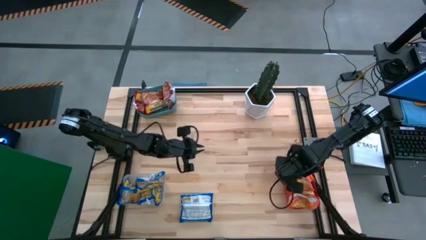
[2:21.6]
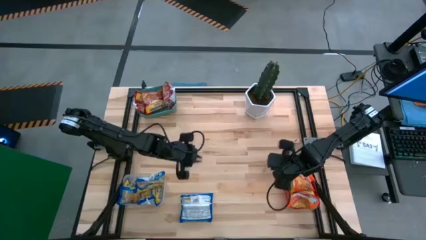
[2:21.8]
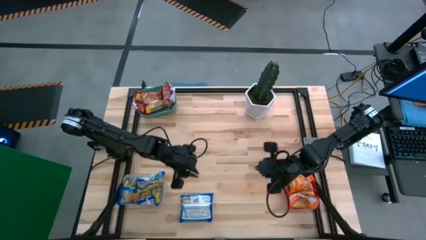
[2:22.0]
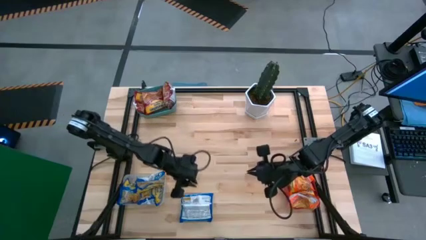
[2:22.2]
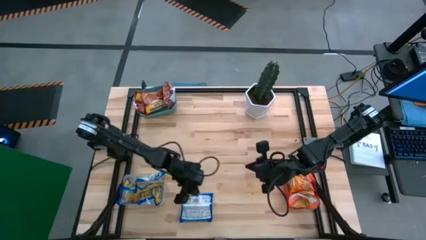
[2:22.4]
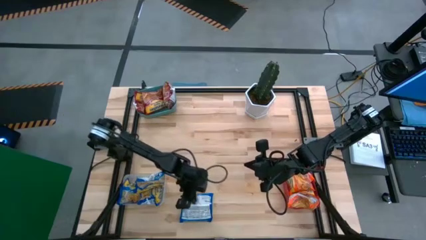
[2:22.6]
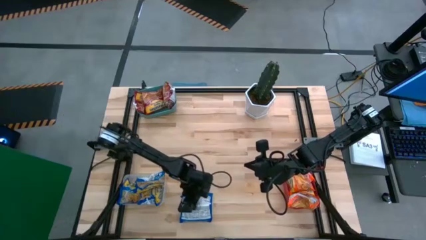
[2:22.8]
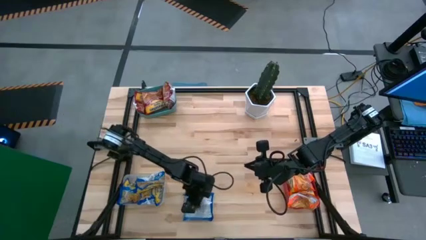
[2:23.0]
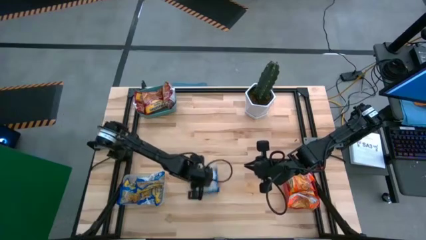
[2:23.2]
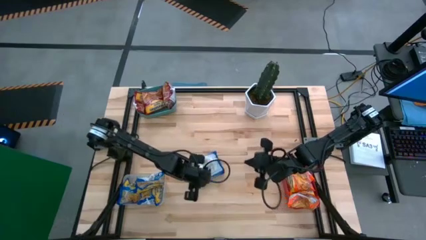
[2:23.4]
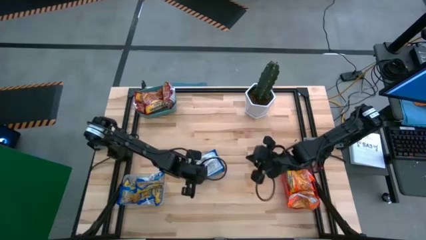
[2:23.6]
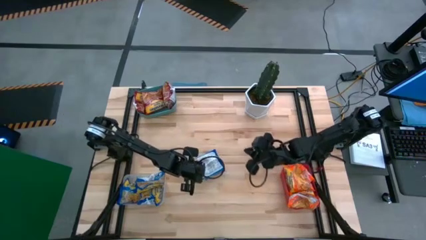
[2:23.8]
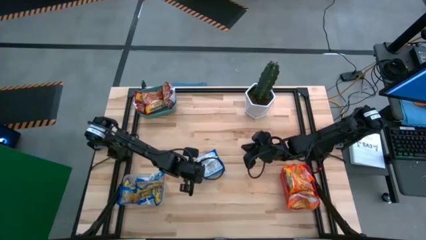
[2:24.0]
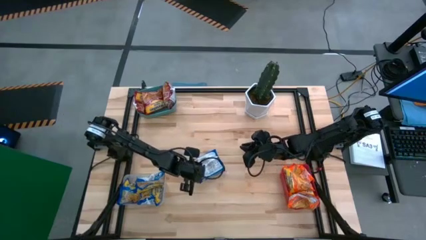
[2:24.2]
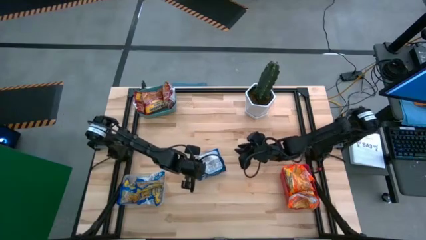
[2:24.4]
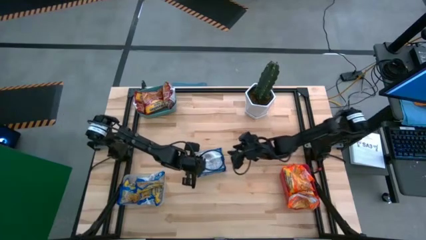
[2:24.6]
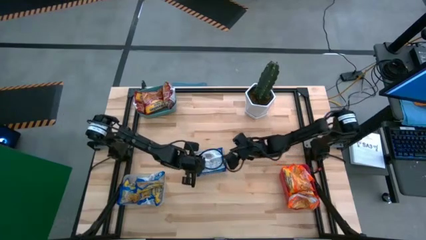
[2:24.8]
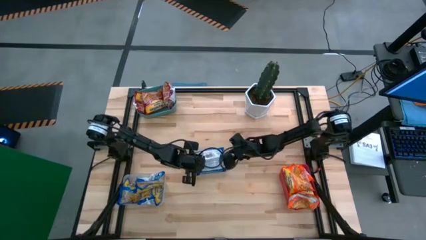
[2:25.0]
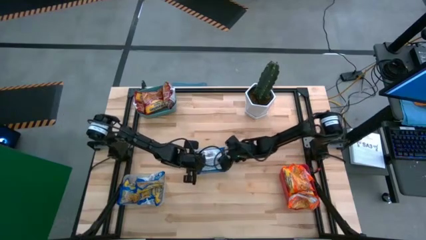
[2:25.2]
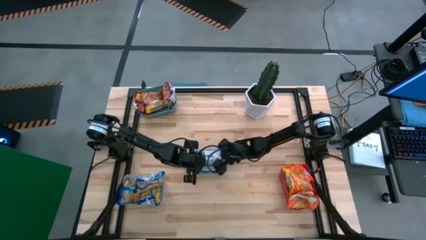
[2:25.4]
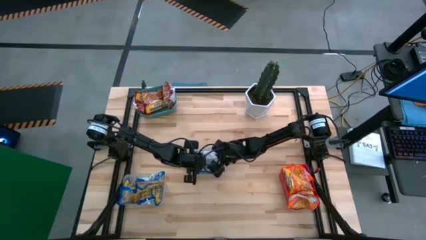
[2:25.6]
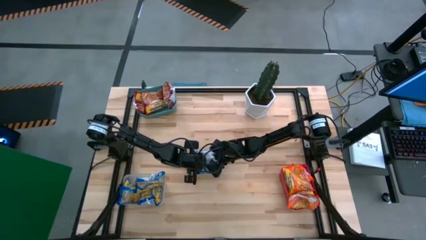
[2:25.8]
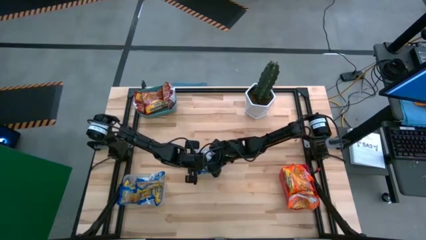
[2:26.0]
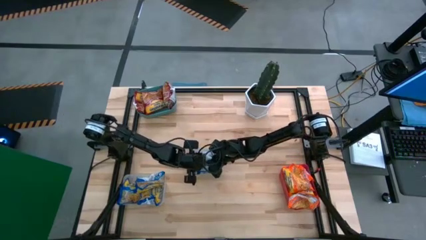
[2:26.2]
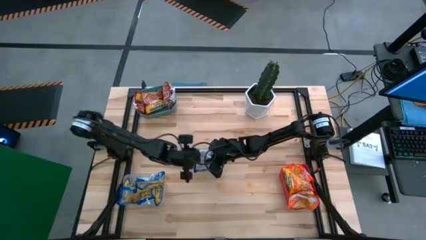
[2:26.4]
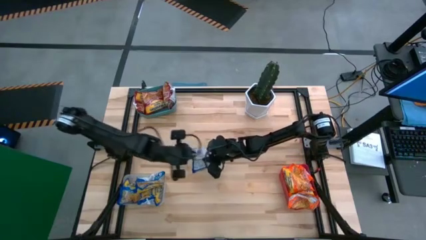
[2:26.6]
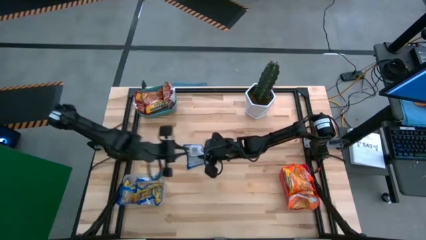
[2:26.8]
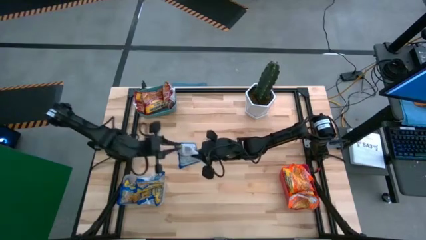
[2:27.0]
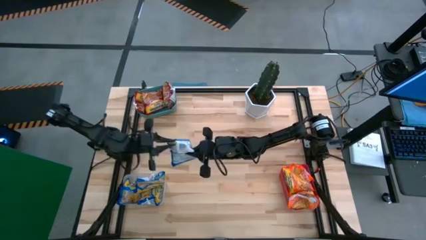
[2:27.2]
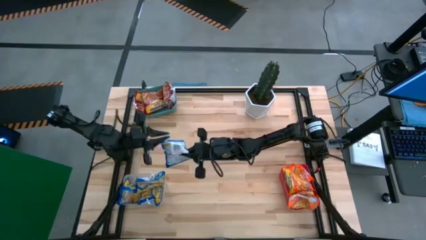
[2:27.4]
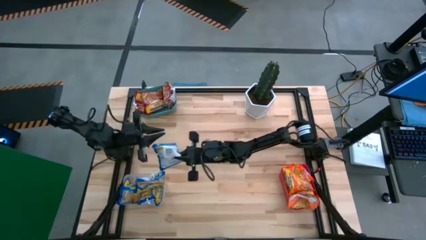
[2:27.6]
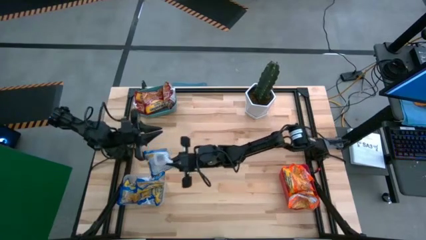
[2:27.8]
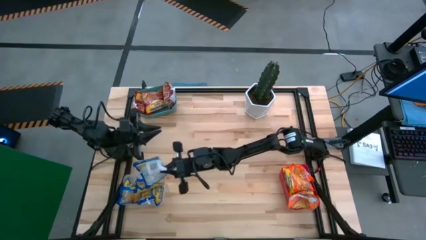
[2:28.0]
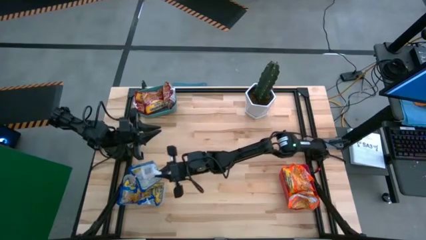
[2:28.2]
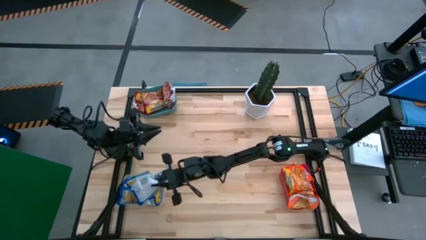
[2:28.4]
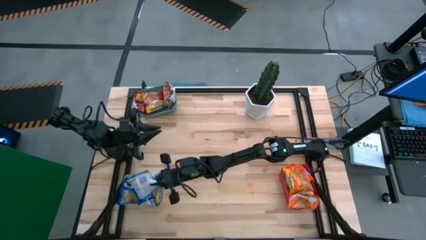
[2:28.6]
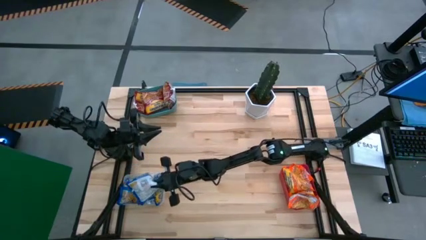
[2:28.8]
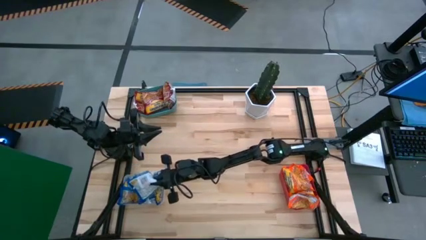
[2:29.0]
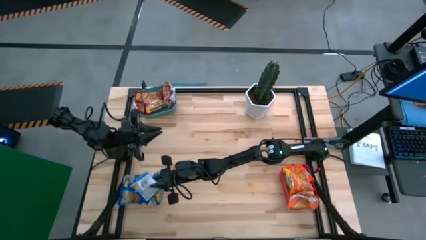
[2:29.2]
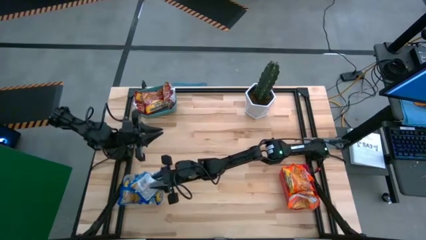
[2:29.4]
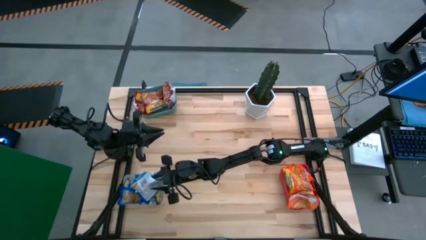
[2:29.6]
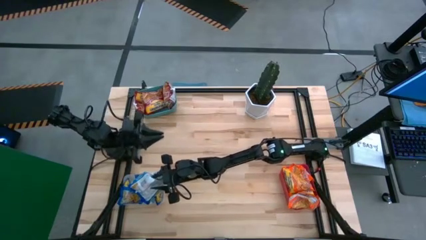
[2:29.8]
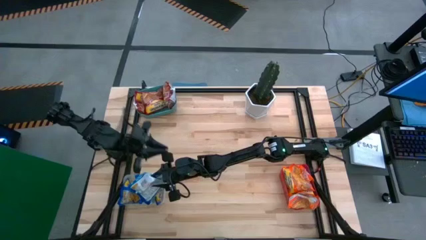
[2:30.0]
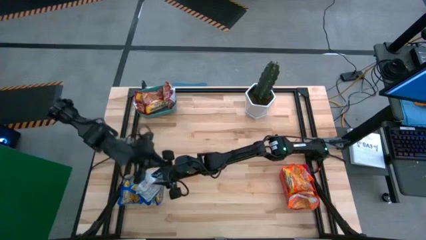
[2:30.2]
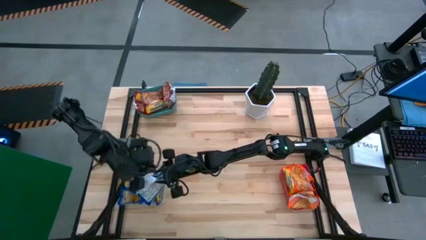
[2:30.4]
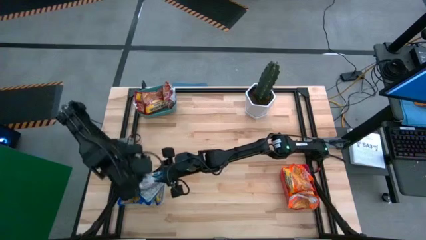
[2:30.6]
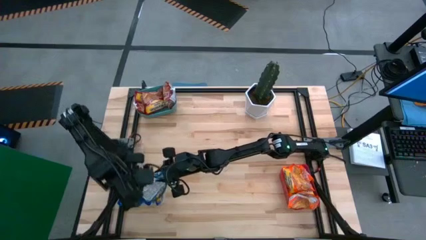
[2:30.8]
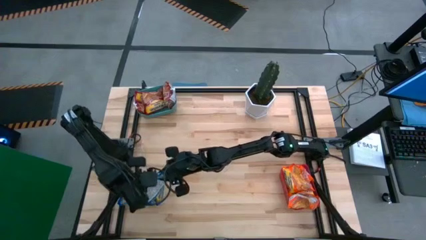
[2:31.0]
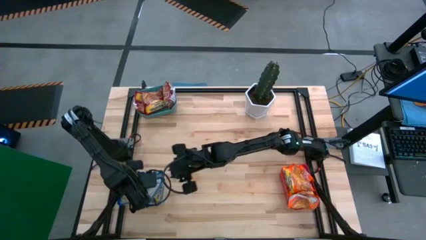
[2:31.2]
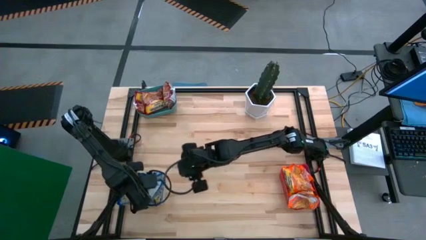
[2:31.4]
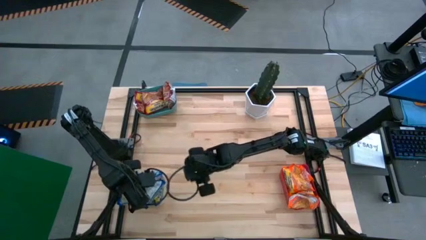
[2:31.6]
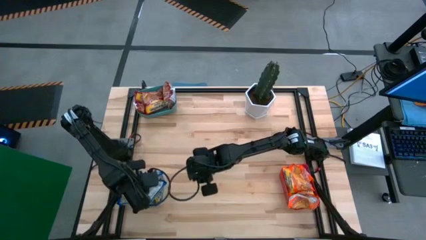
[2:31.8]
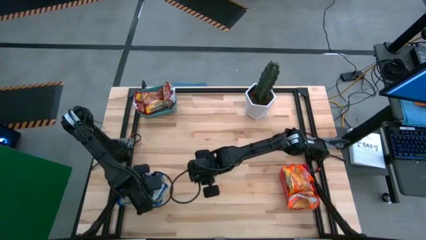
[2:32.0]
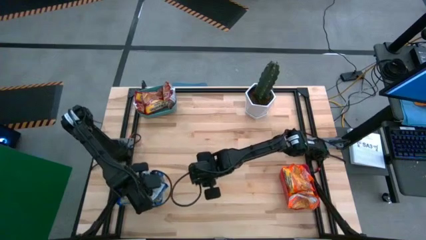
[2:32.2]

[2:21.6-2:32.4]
Task: Sort Maruchan noodles
Put the blue noodle pack into the transparent bin

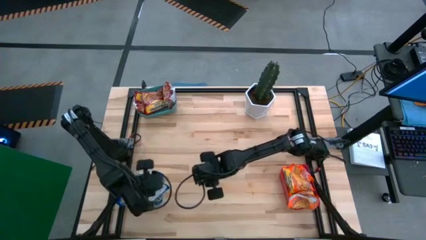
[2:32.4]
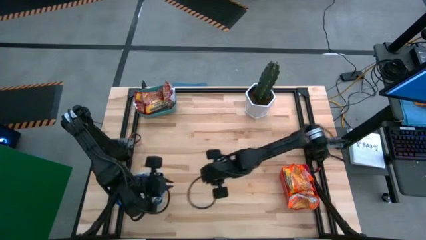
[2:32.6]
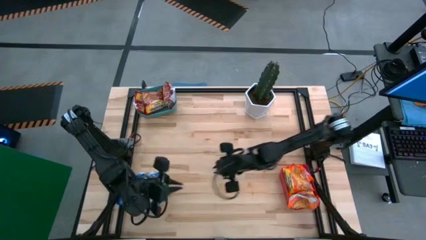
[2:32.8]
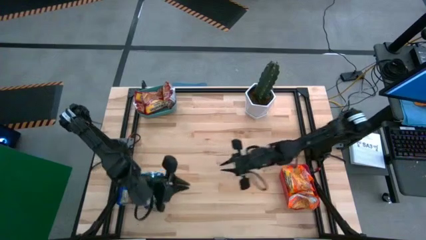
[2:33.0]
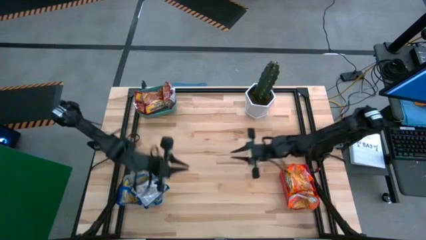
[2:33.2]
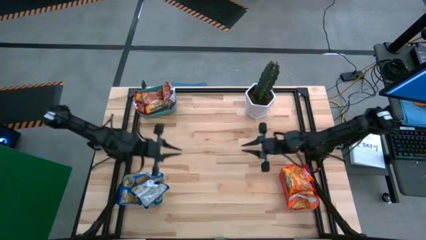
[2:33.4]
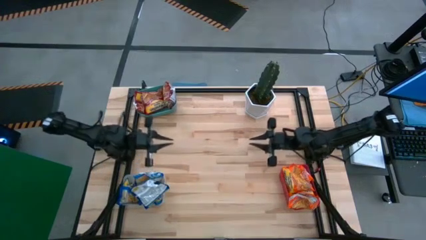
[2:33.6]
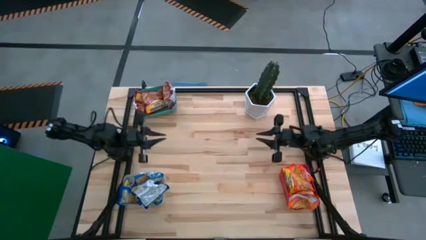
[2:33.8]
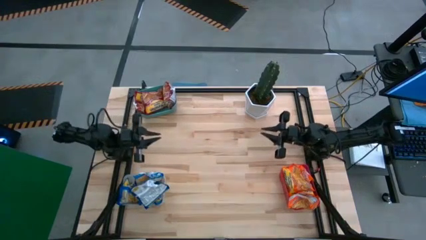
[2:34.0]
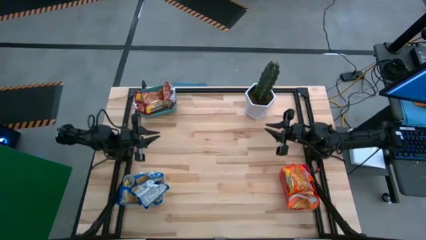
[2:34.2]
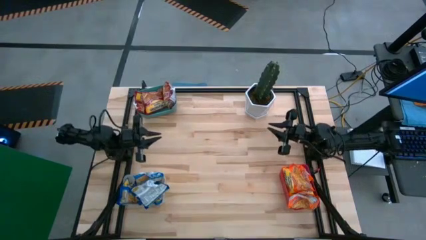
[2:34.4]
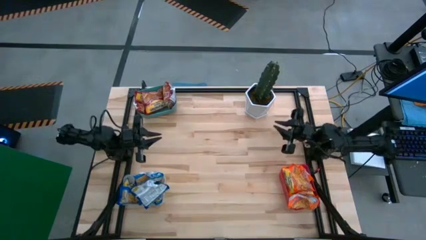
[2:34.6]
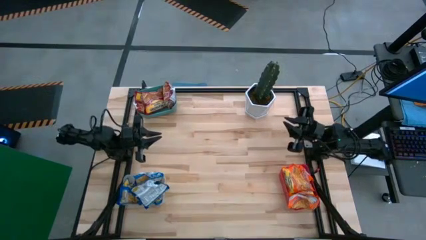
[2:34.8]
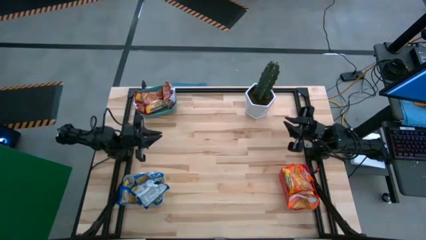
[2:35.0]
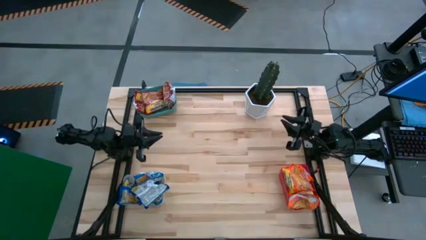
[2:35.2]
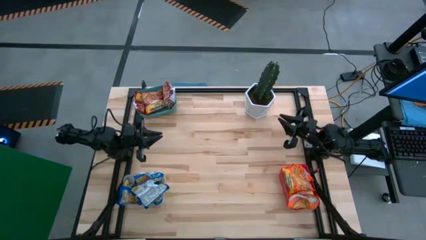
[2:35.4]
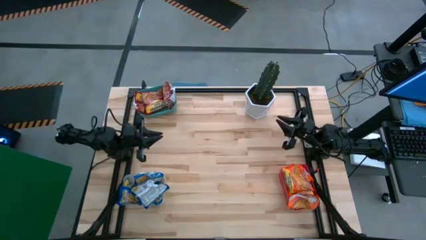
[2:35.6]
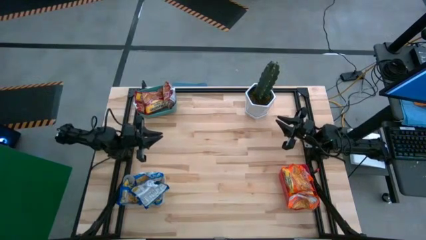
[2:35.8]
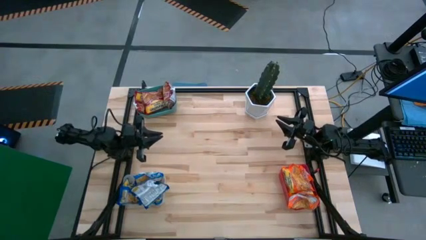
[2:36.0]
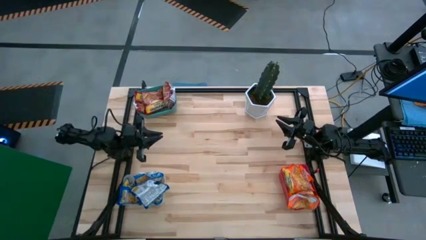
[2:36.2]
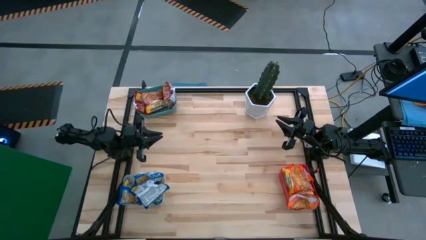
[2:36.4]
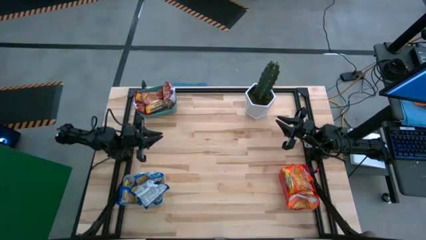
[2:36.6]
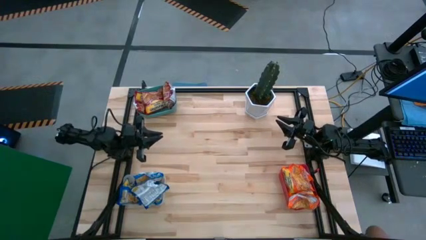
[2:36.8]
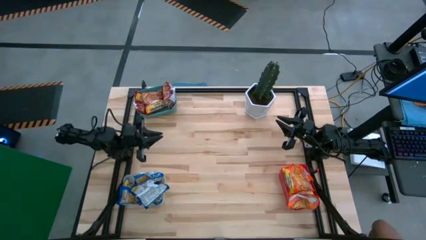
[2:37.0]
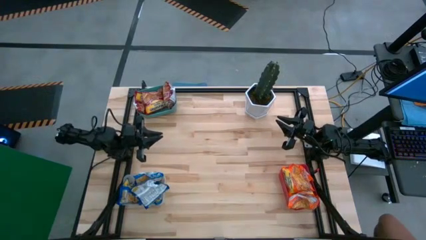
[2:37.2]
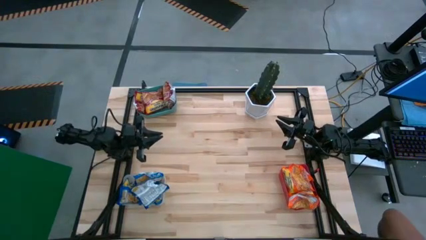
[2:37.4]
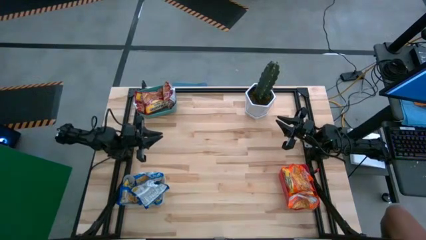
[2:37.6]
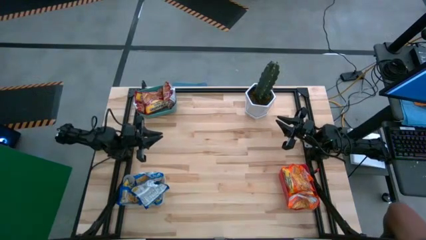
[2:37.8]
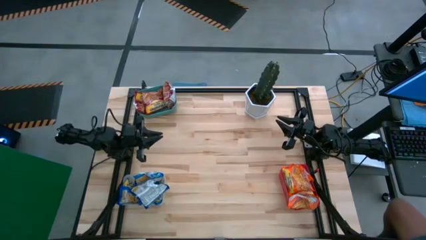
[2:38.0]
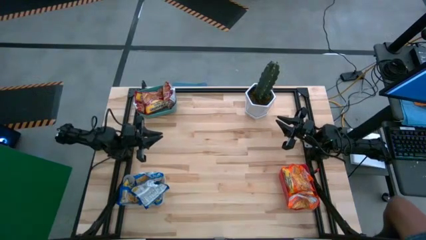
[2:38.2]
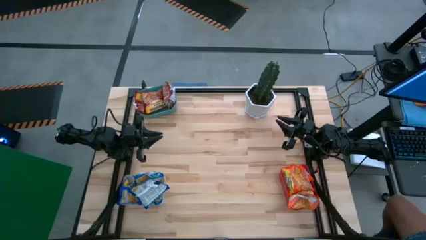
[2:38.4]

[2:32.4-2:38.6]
Return to Home Position
